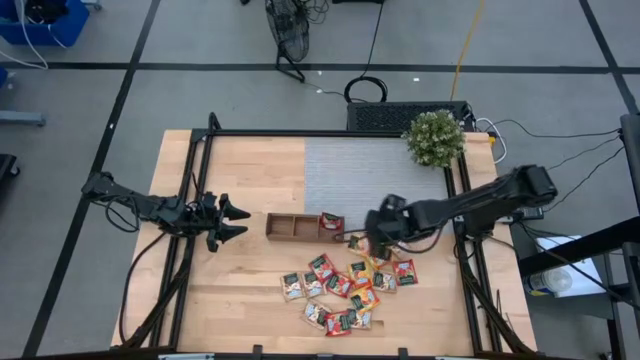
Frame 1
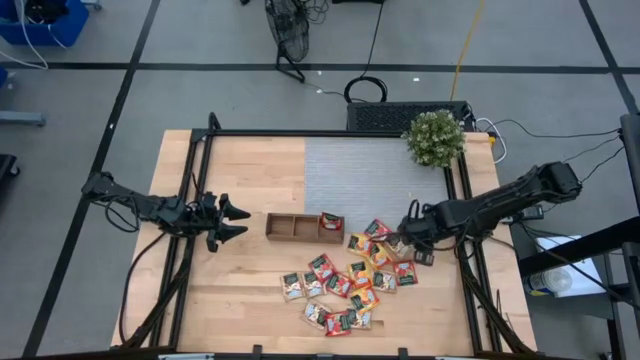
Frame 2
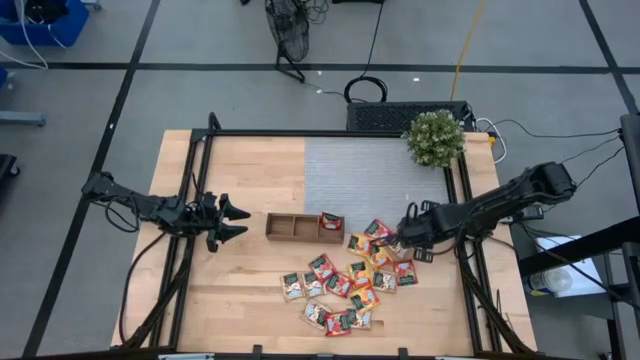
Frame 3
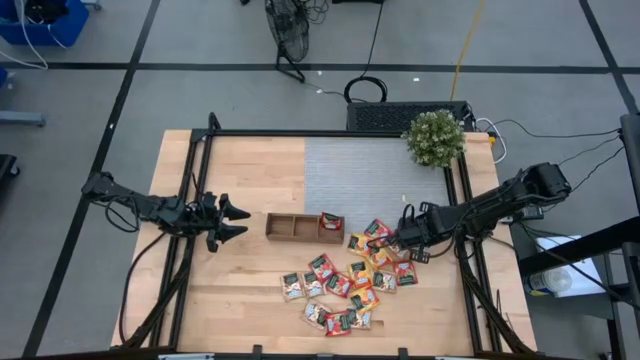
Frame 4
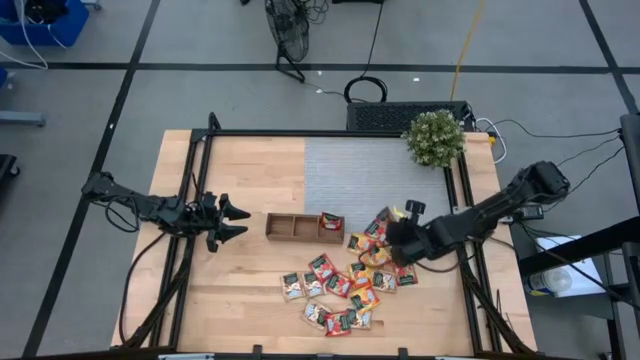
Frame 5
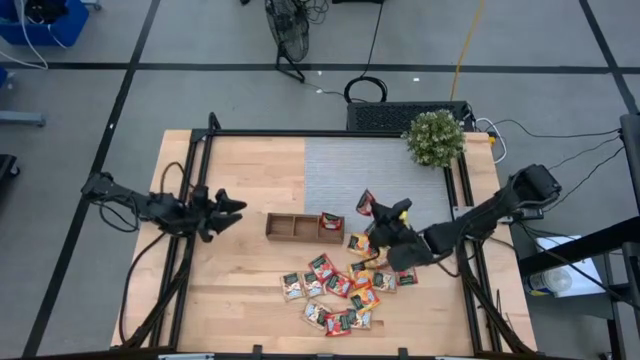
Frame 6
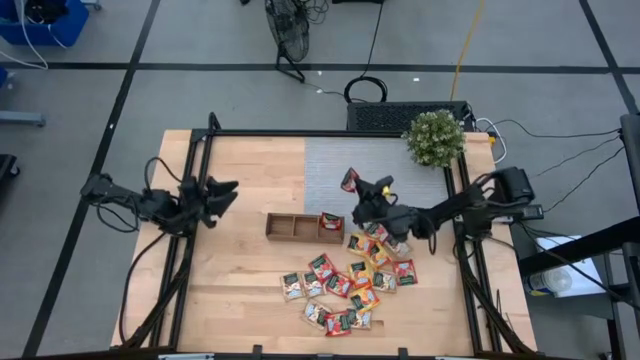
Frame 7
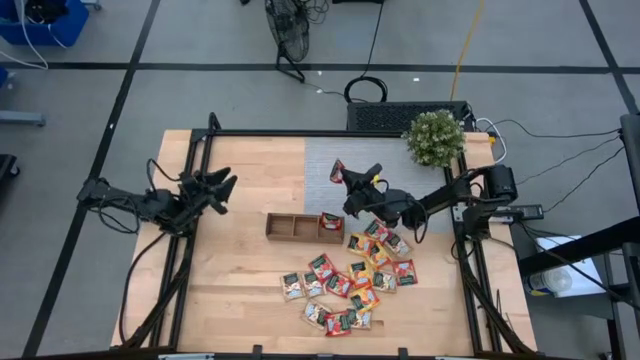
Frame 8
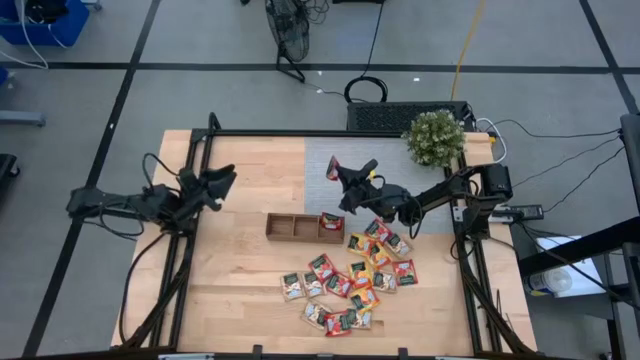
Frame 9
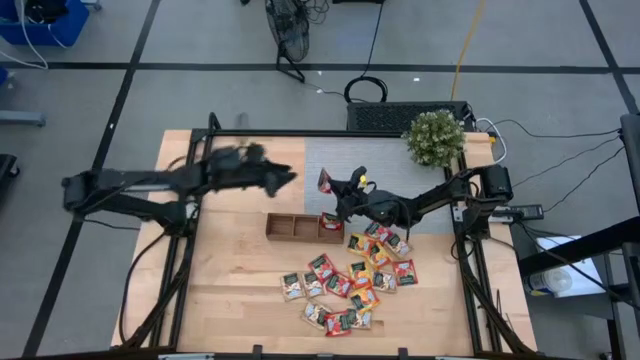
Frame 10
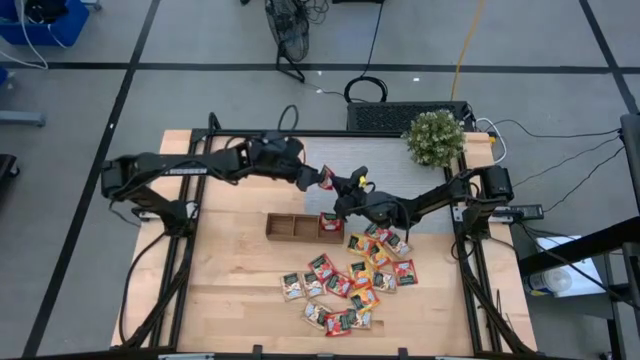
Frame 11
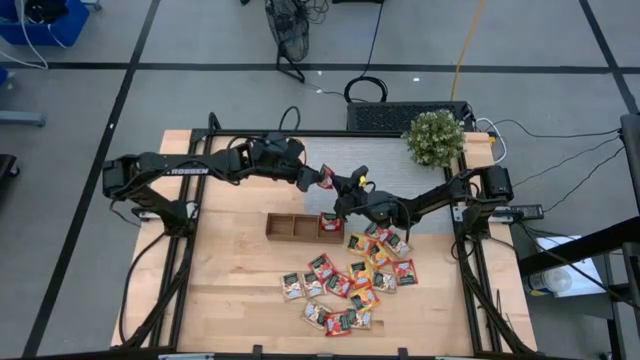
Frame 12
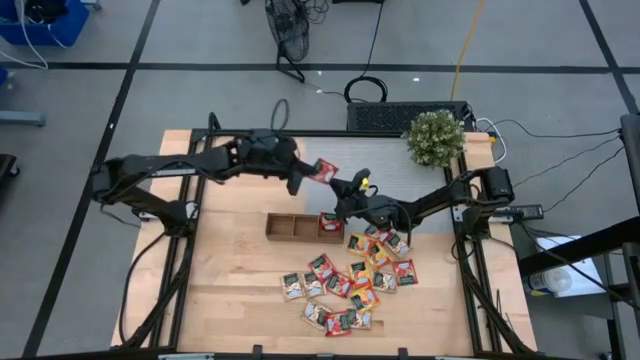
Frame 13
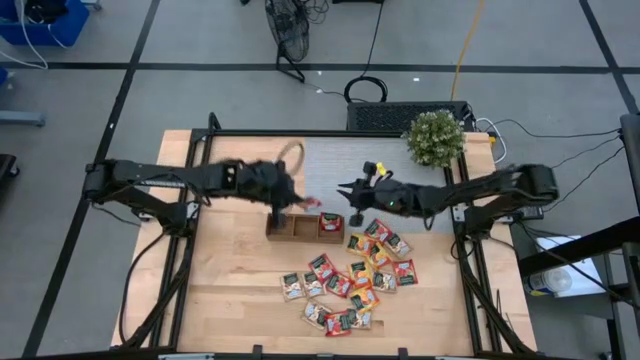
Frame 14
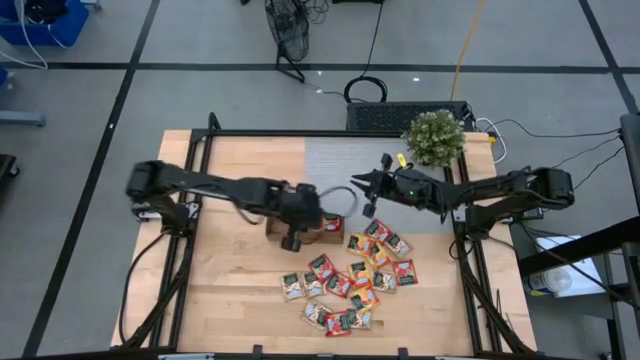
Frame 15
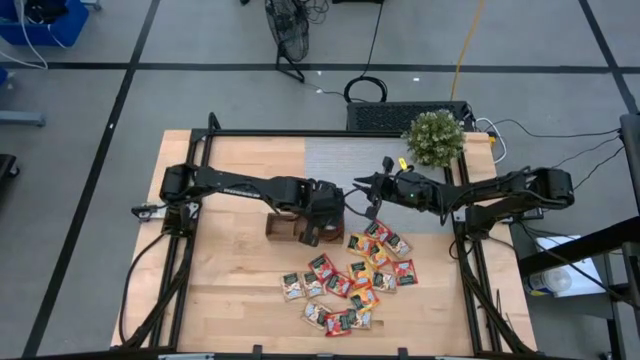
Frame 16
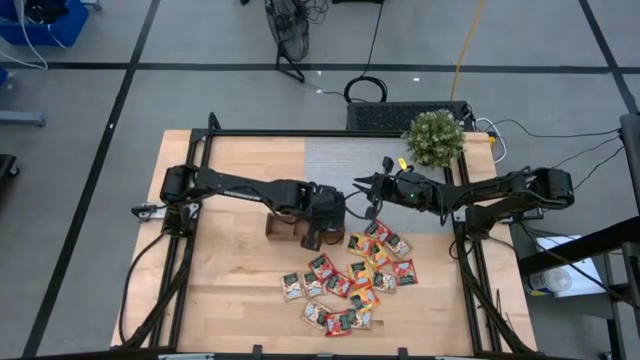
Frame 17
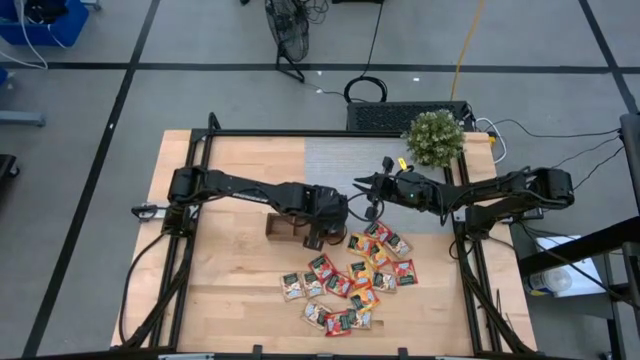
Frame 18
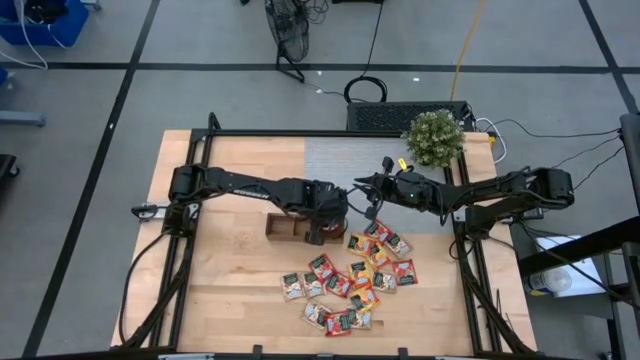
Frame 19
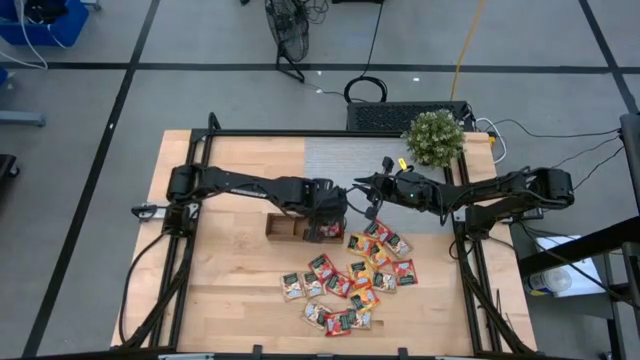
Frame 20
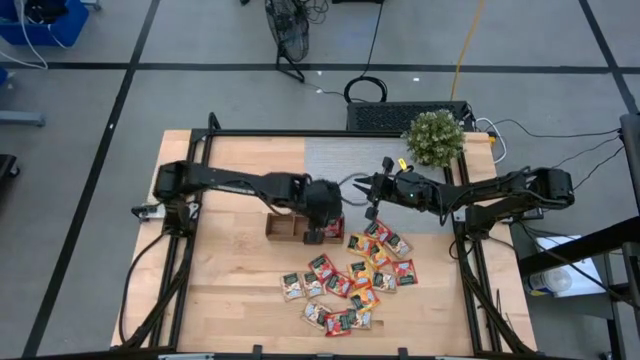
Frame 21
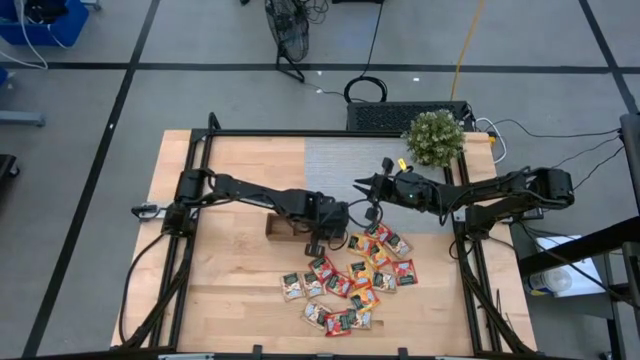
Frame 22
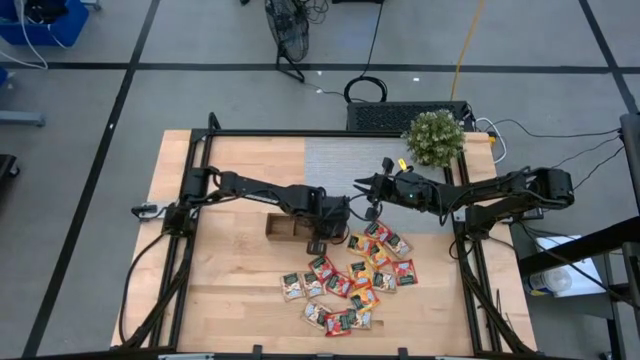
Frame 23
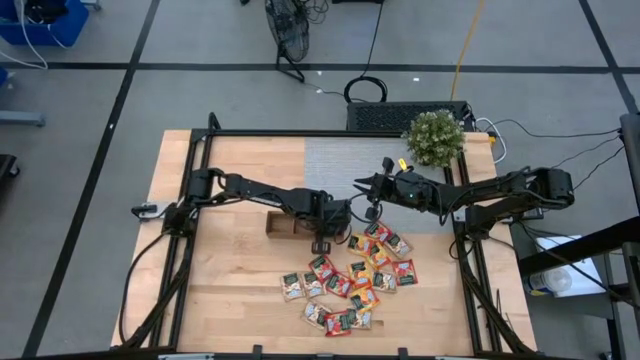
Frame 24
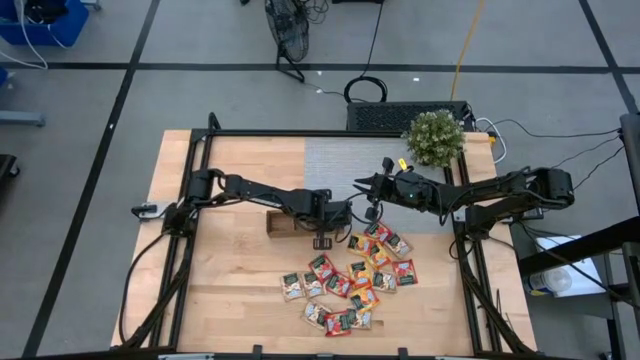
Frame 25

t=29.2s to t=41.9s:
Task: Pick & Place Tea
Put the red tea bag into the right section of the wooden organizer

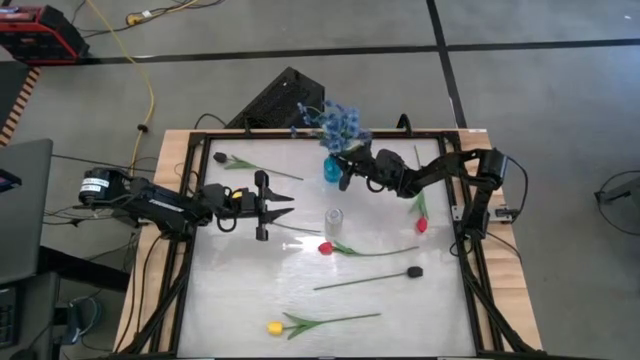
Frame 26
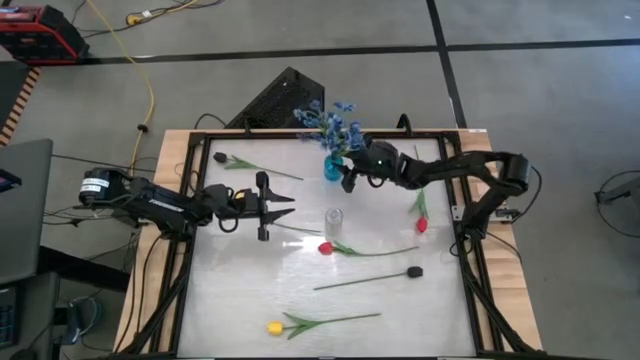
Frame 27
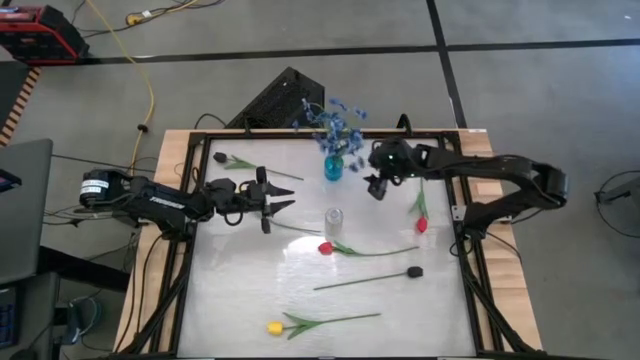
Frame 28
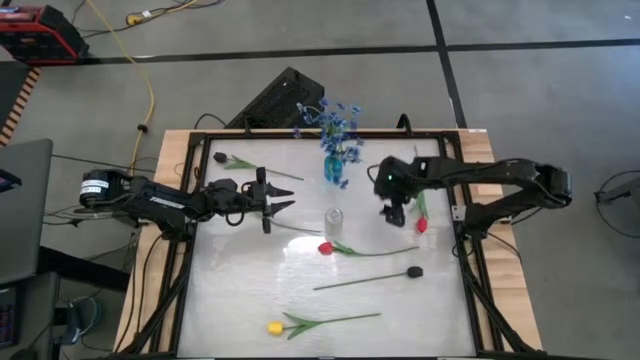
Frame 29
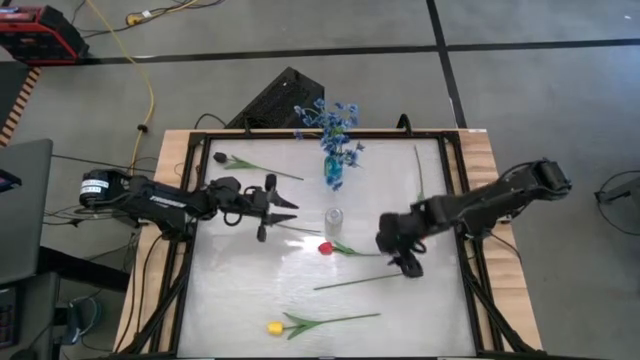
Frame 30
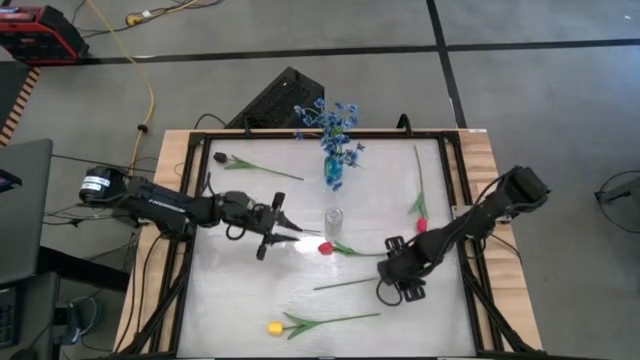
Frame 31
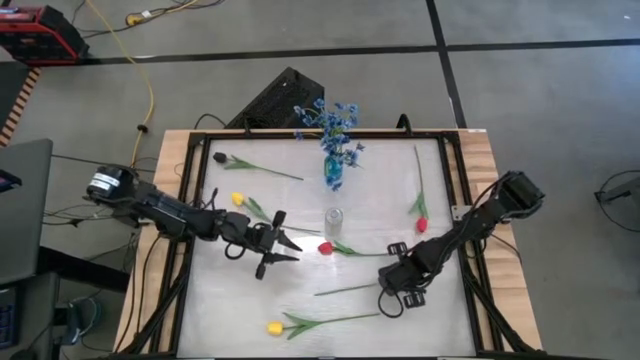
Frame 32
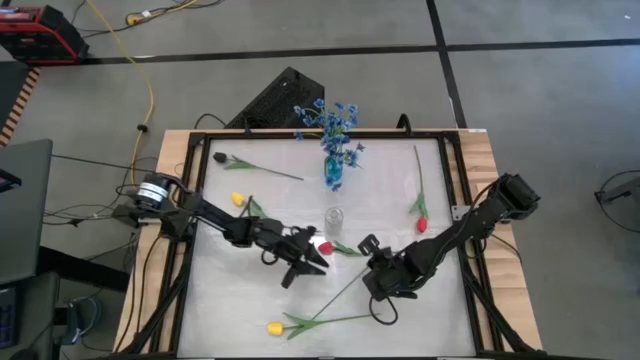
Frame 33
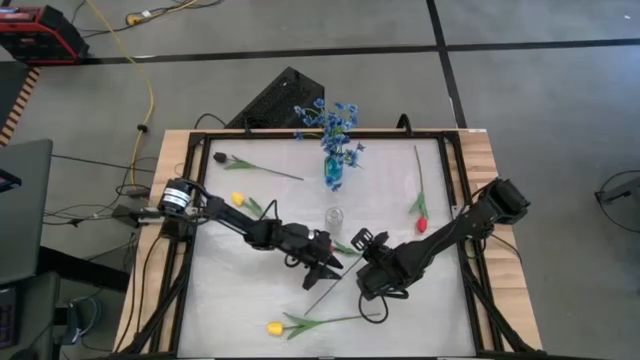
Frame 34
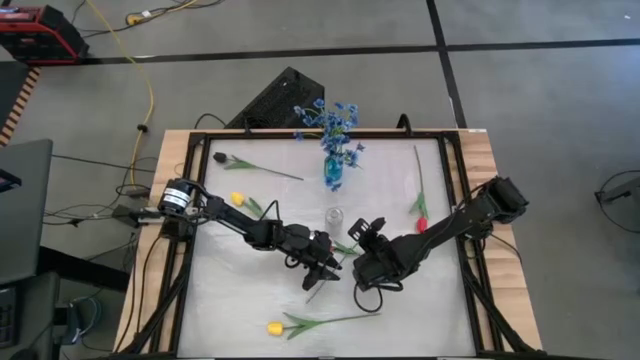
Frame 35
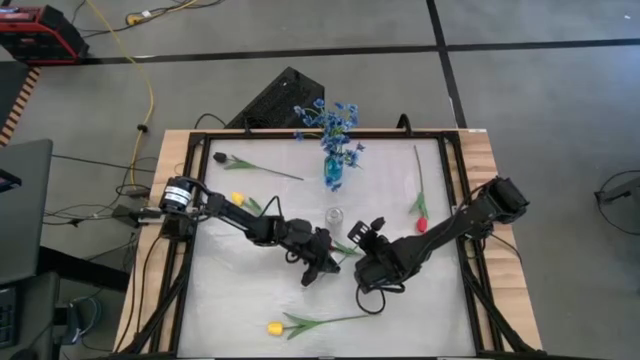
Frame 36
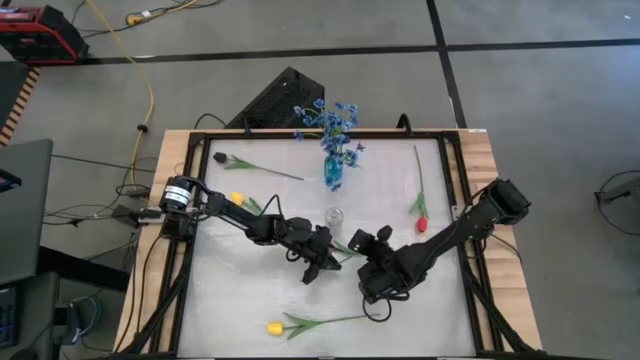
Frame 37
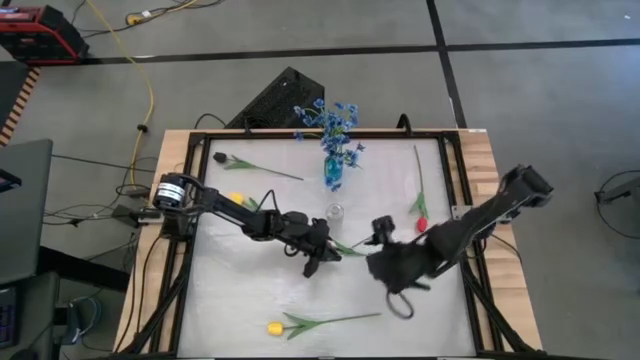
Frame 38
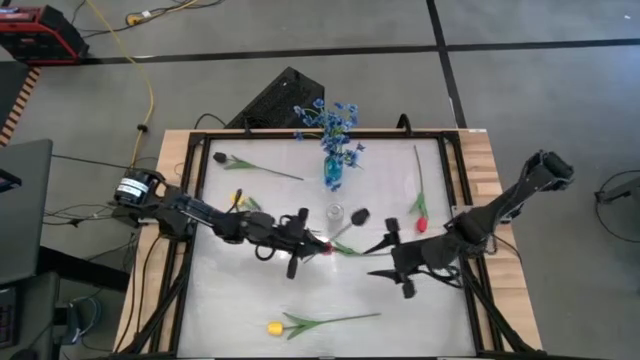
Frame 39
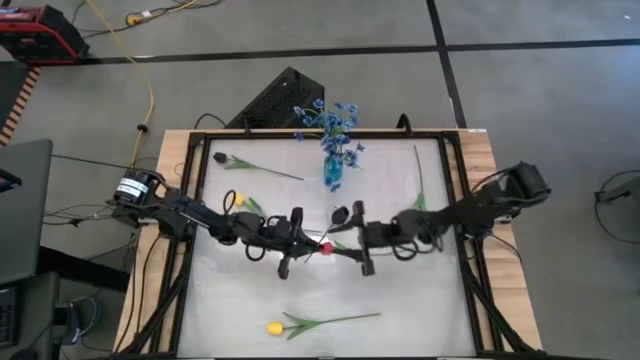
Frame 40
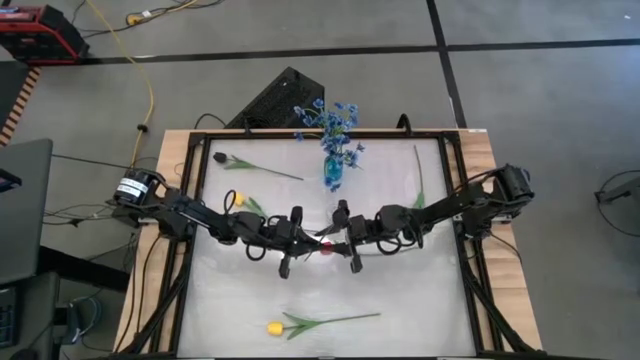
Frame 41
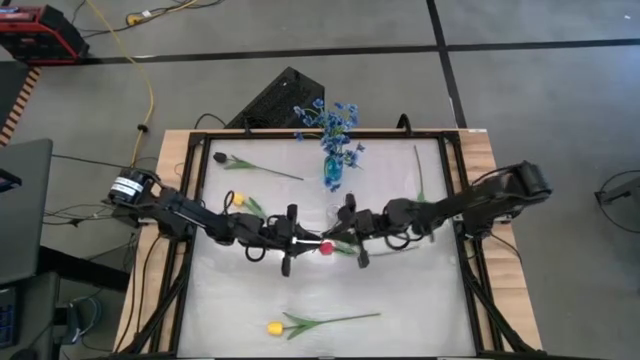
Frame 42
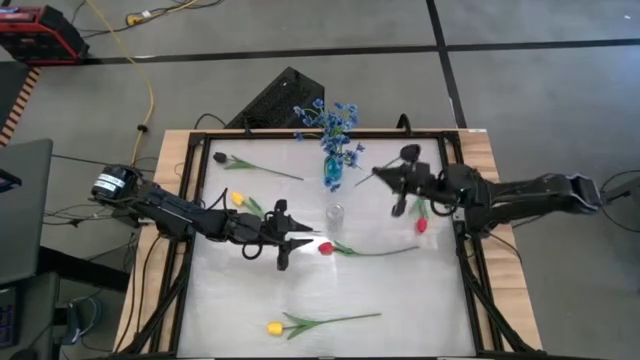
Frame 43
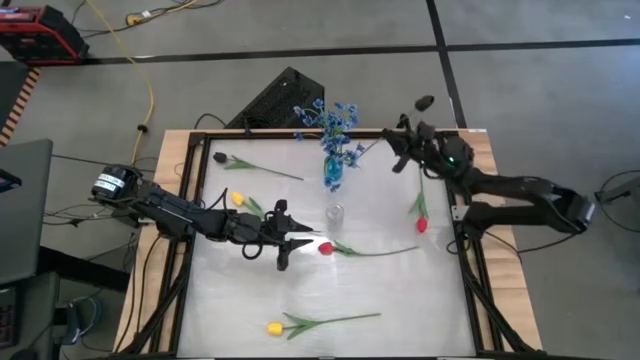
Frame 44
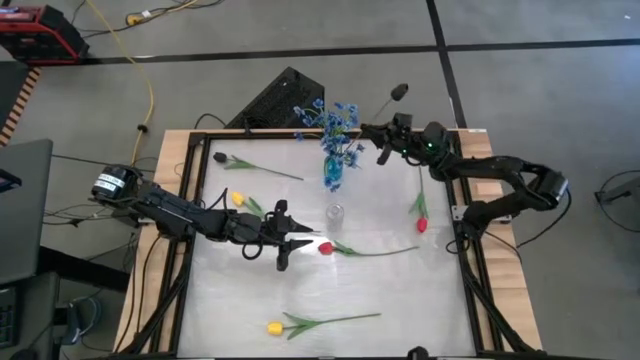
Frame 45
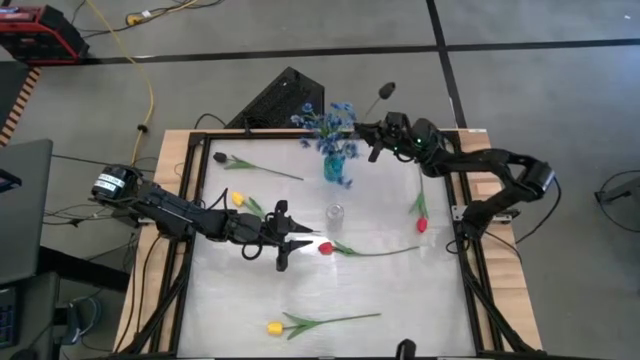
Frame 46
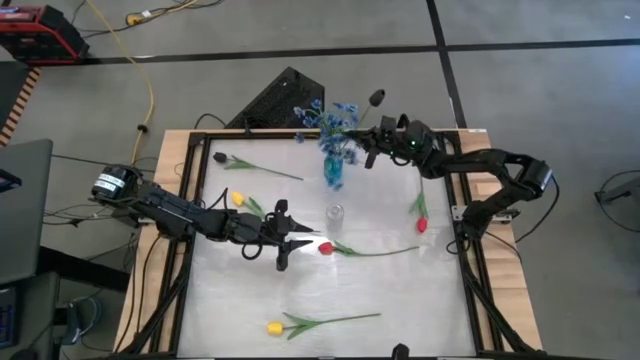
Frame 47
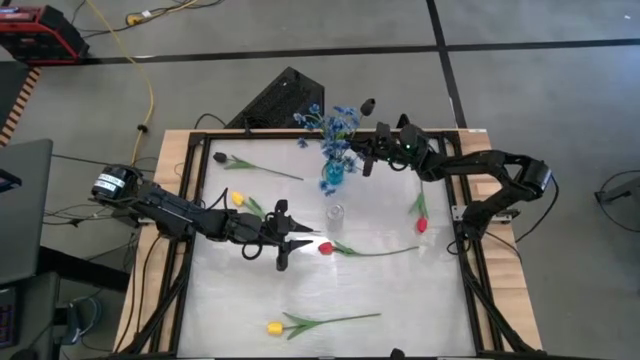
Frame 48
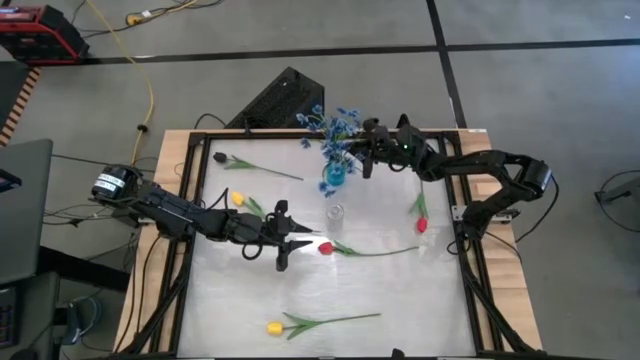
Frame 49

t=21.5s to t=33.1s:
Task: Sort flowers into vase by color
Put the bottom black flower into the blue vase
